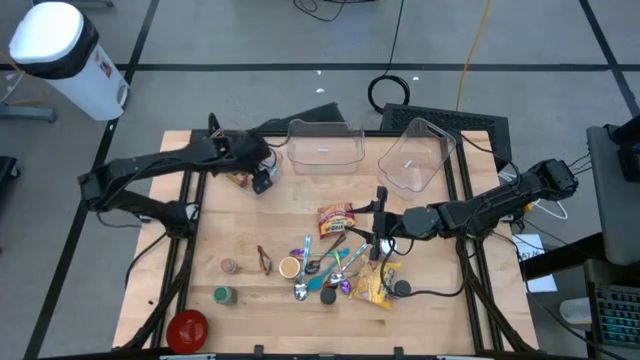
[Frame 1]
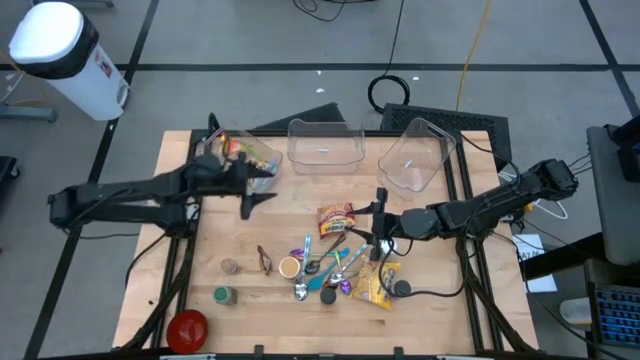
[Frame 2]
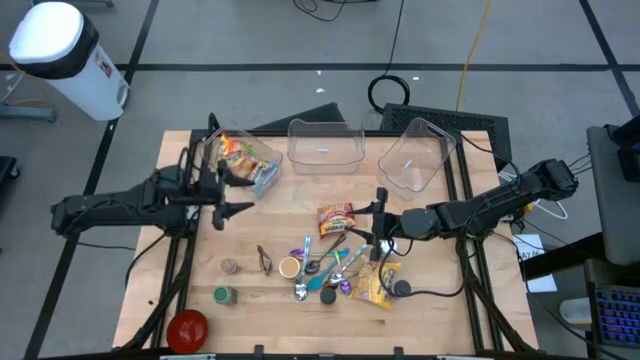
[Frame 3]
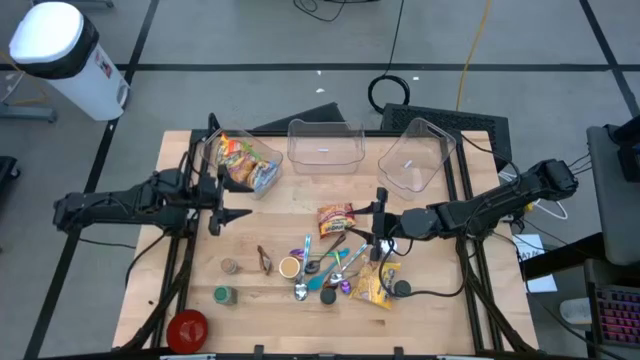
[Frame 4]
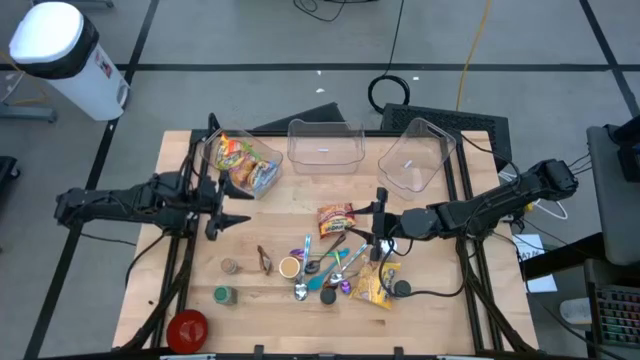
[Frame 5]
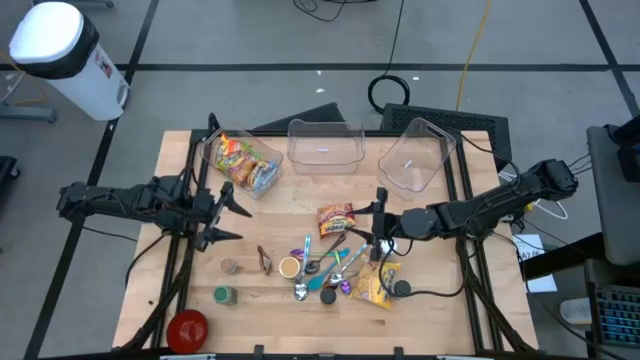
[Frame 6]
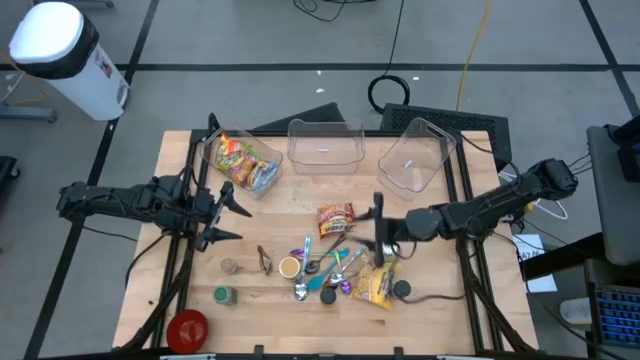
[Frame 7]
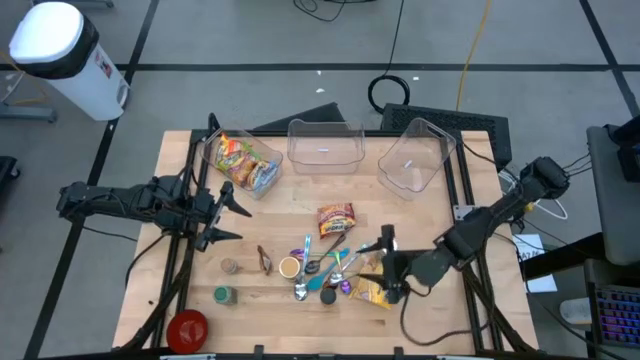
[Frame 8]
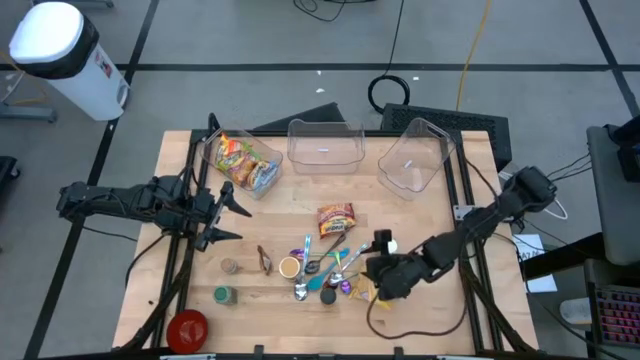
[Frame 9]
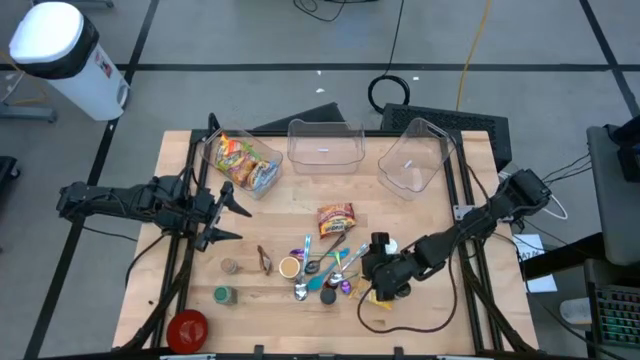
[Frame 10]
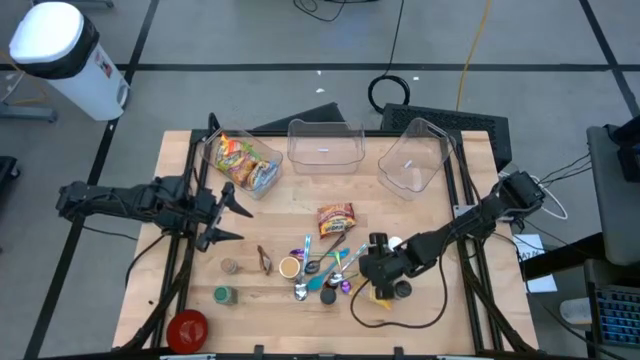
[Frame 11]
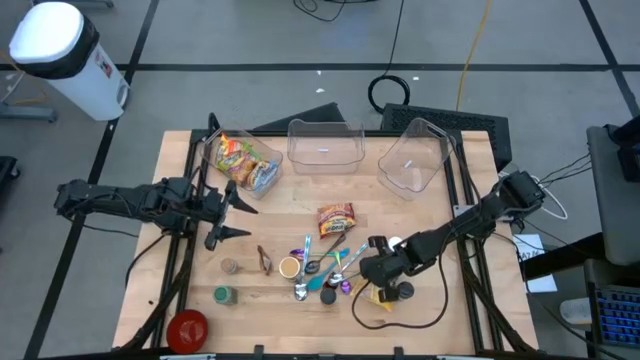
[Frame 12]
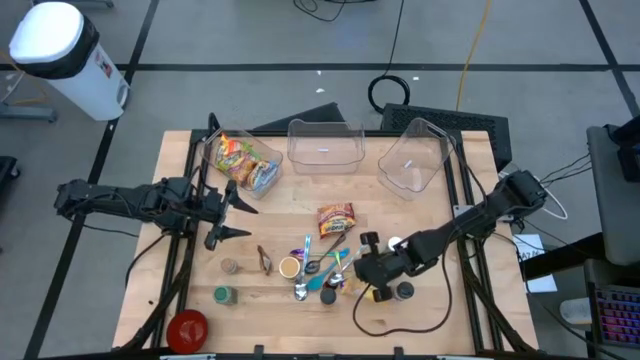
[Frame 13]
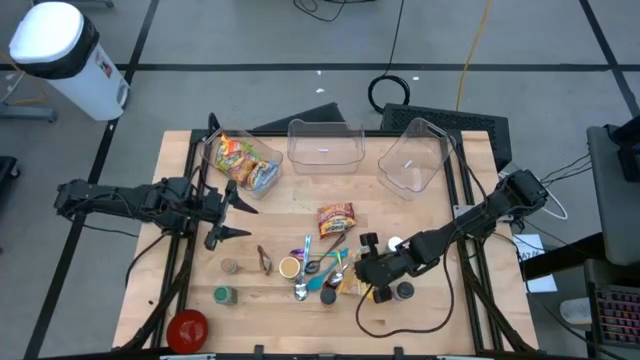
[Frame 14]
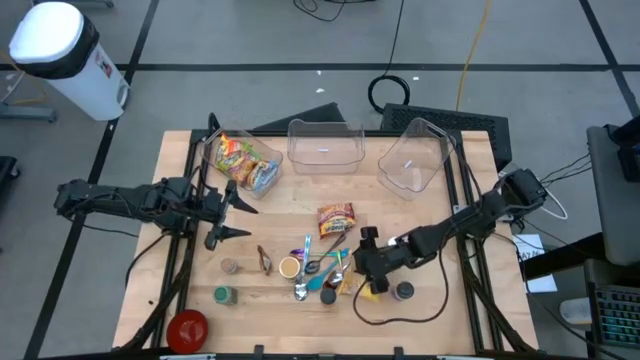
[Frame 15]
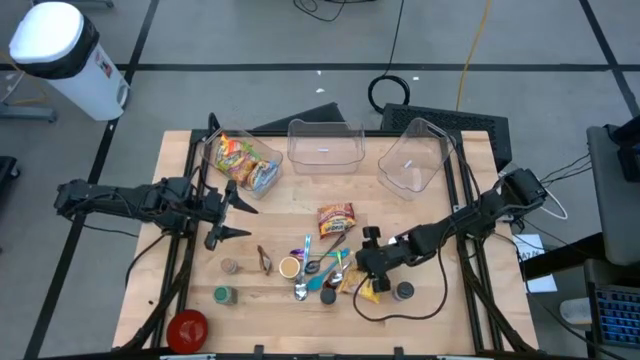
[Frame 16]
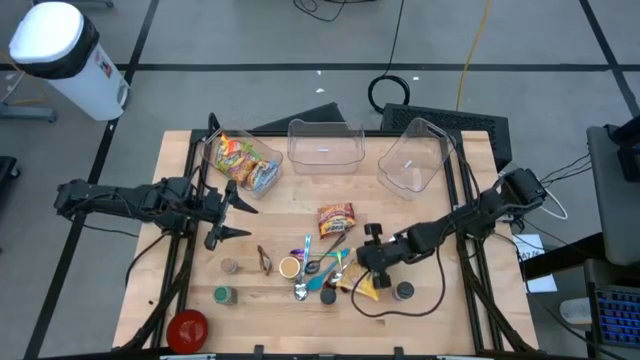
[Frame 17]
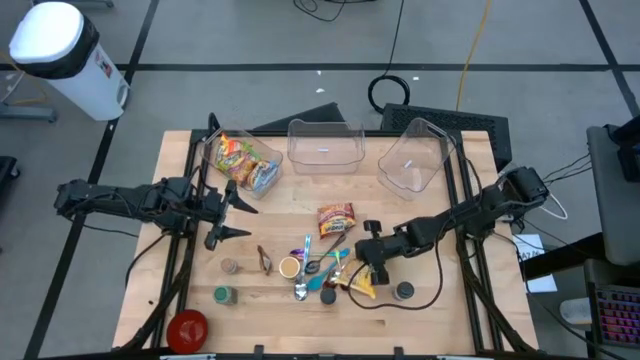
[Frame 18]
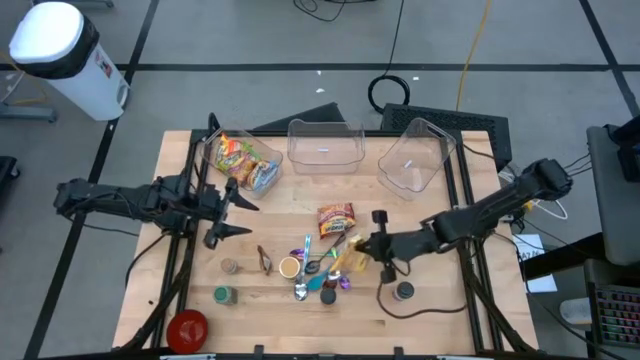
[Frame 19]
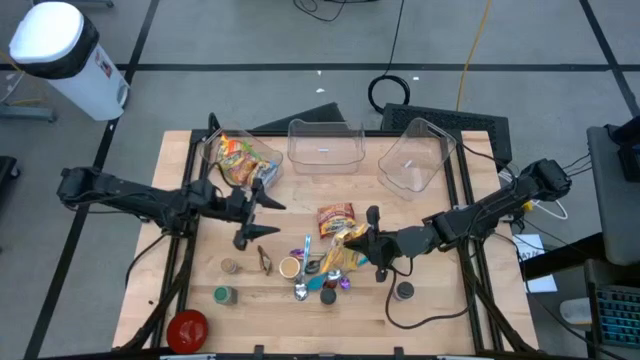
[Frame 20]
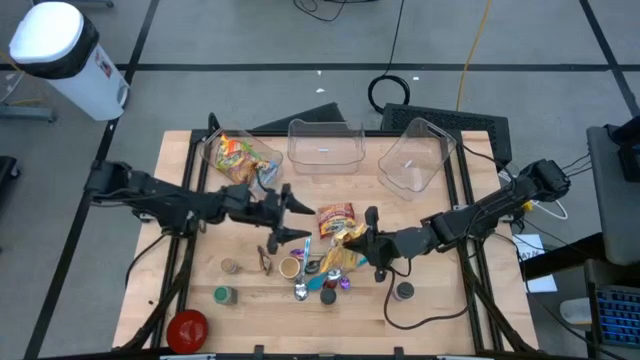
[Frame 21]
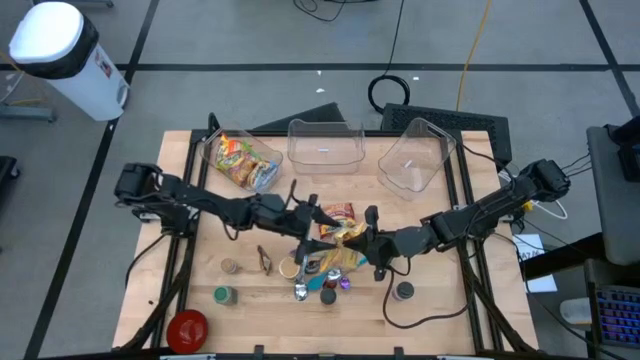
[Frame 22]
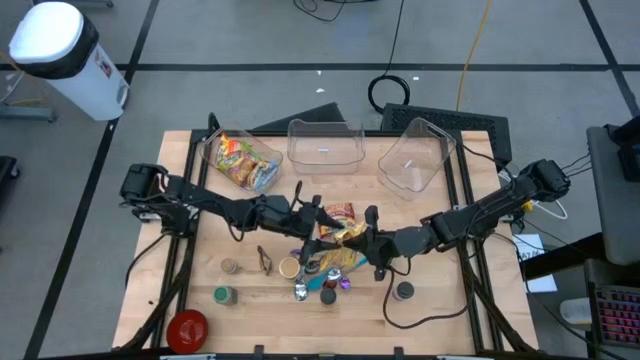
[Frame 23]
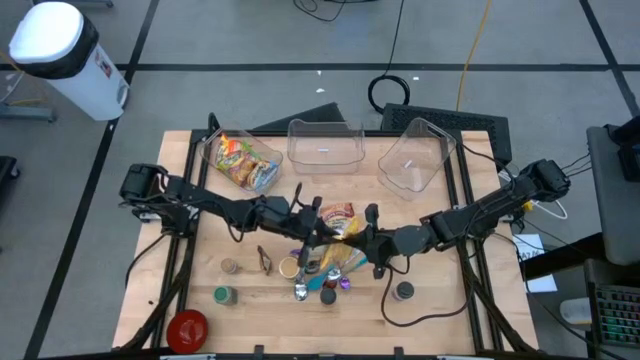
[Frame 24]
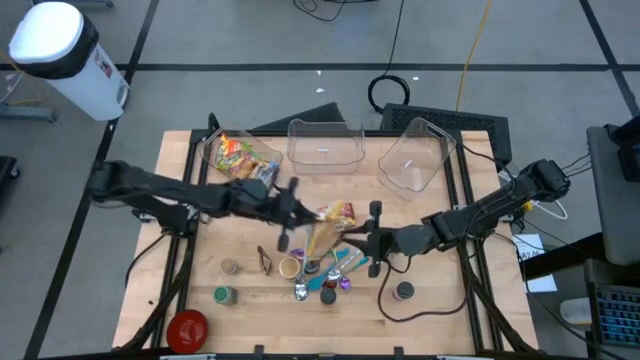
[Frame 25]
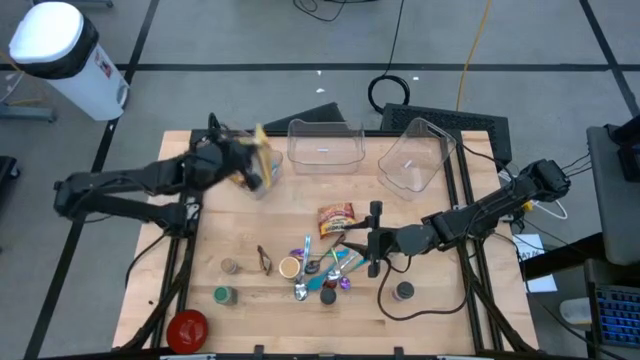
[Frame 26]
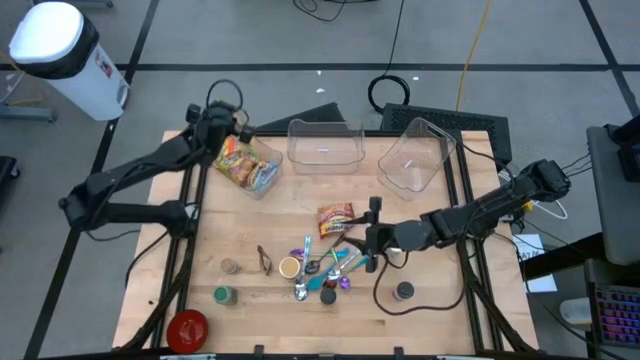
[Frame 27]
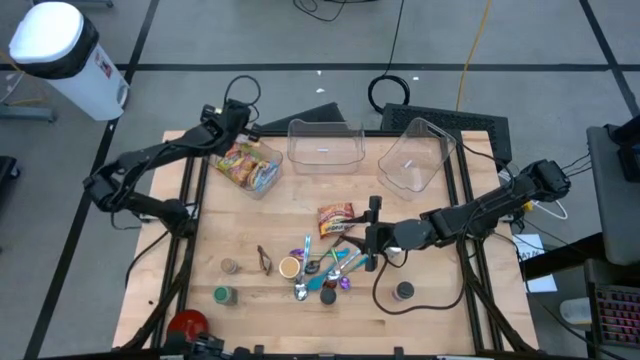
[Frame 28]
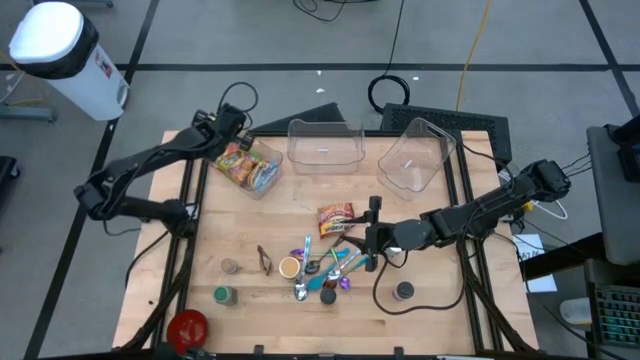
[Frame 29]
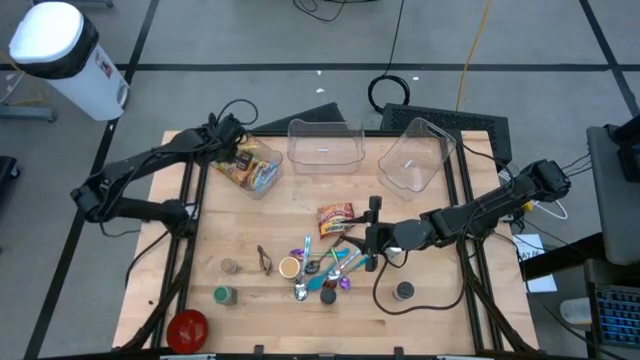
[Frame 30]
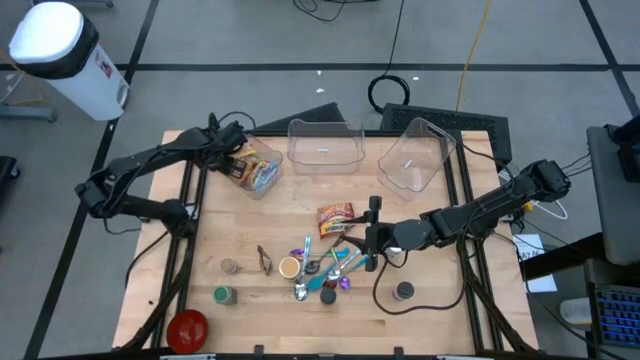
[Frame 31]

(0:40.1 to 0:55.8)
Task: Pick & Place Food Item
Put the yellow noodle pack into the left transparent bin

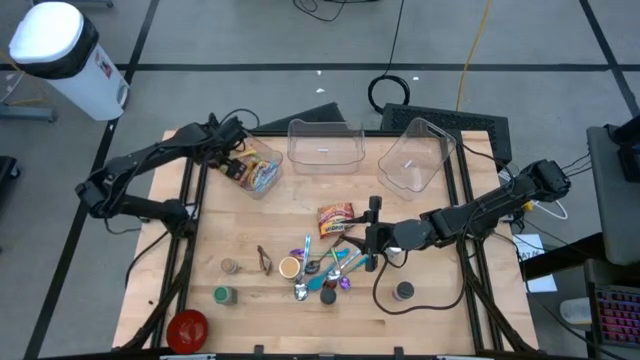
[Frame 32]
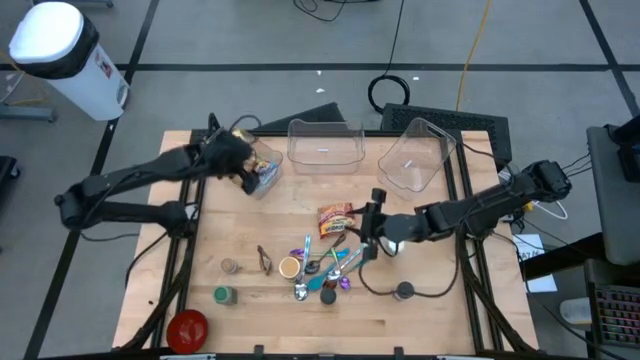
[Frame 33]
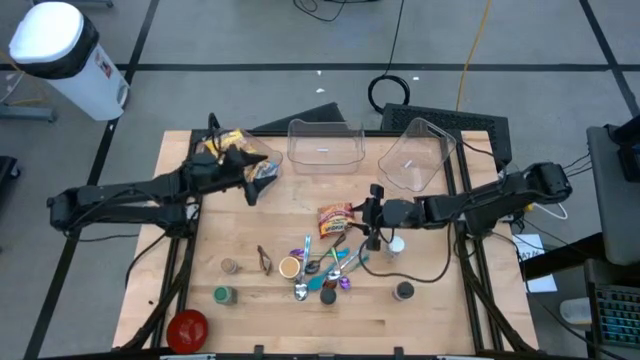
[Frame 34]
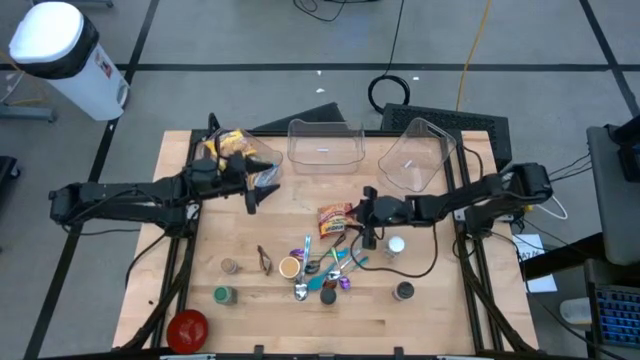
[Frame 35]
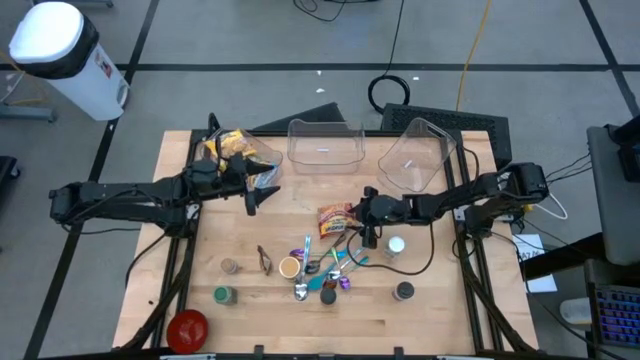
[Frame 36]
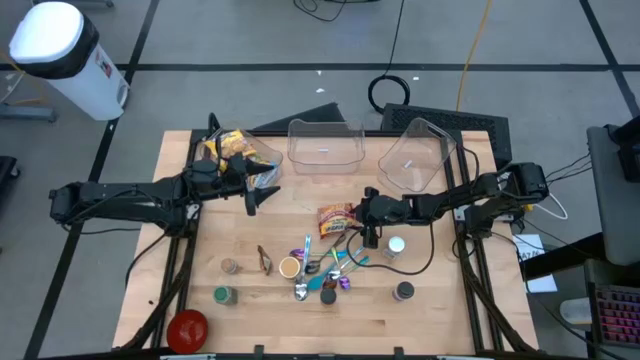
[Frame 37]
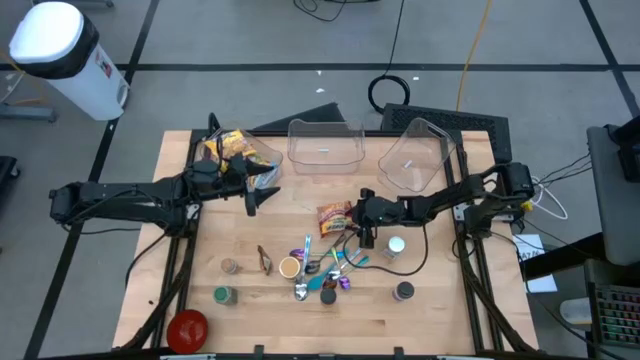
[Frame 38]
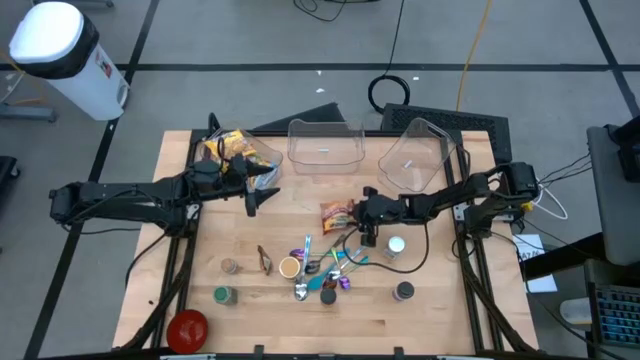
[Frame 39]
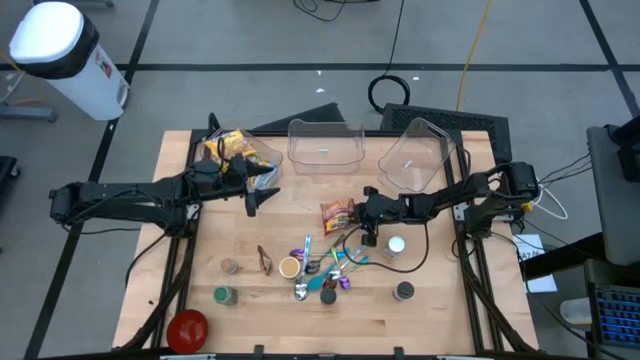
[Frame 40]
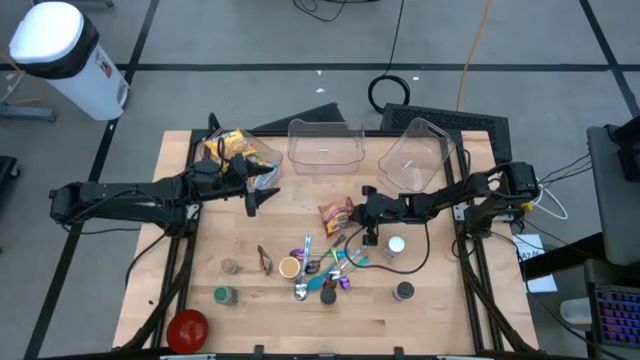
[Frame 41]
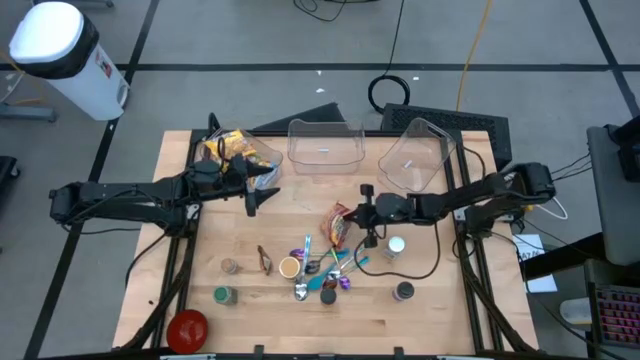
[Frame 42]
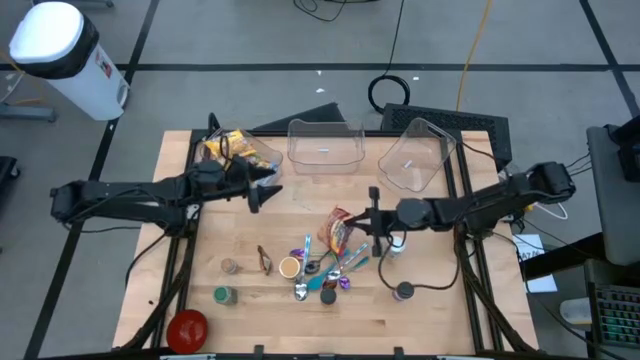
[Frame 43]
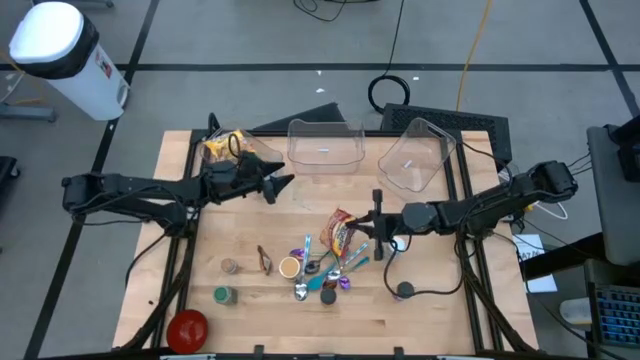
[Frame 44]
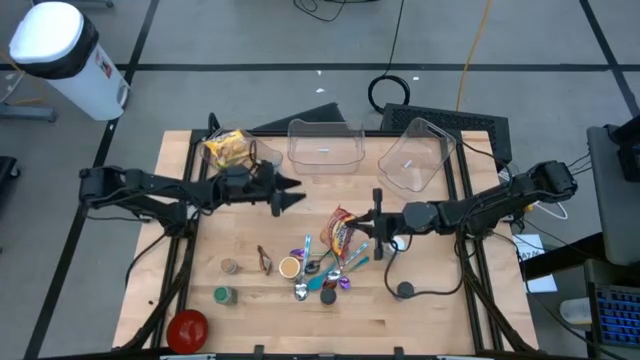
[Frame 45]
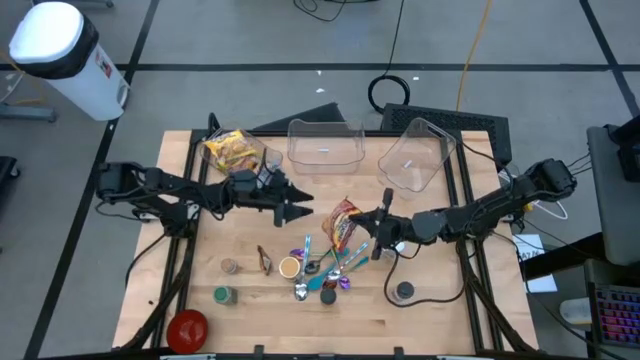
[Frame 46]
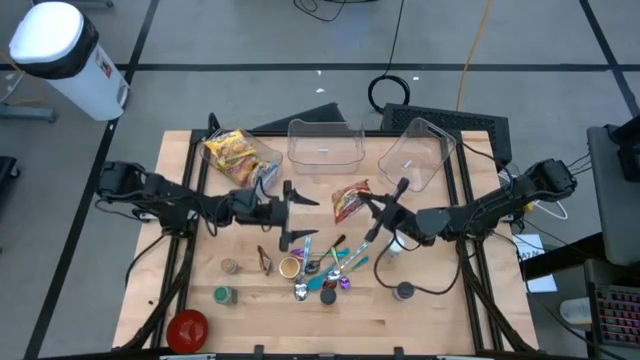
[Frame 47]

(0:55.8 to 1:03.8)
Put the red noodle pack into the left transparent bin
